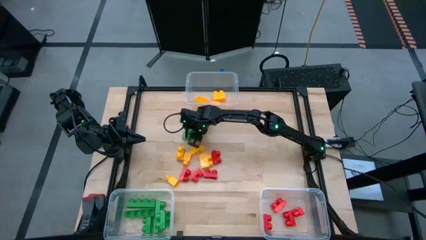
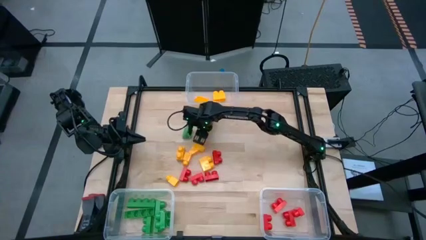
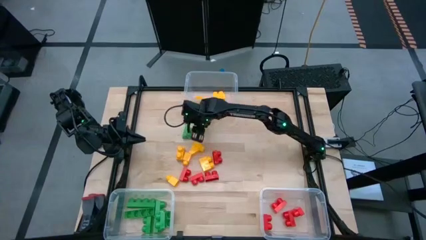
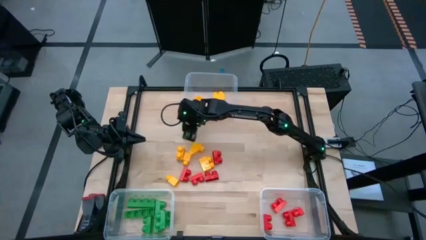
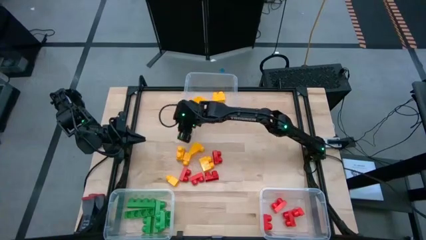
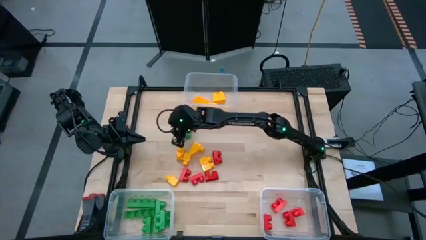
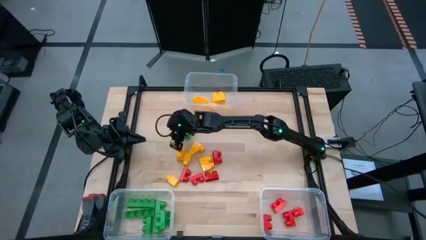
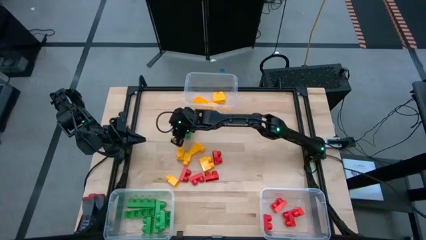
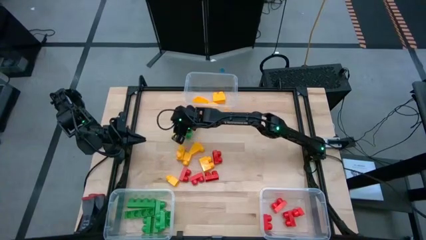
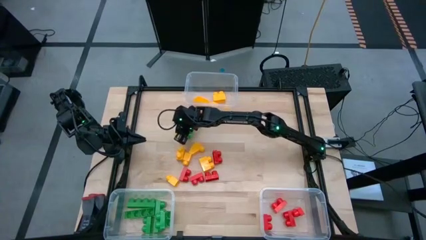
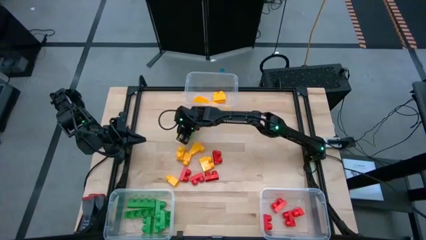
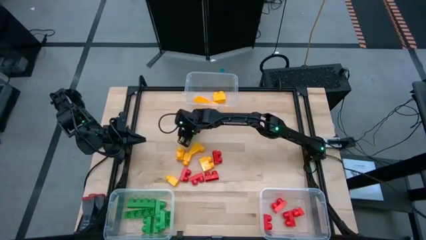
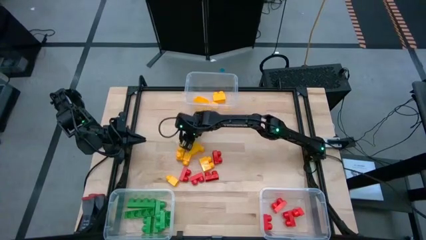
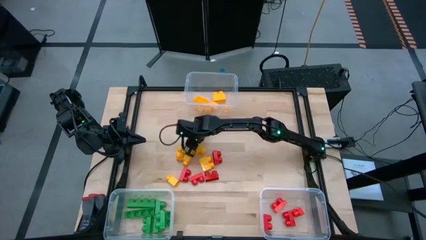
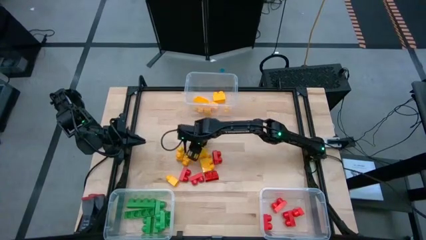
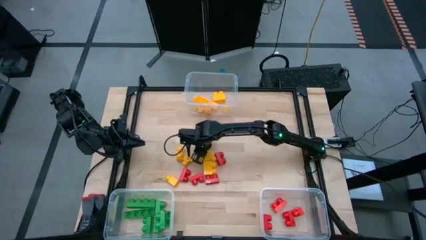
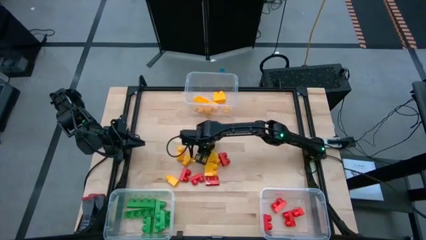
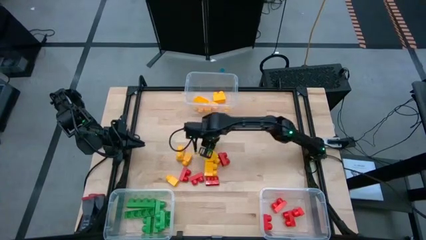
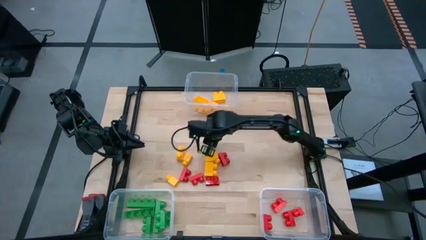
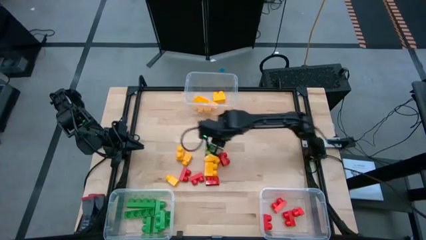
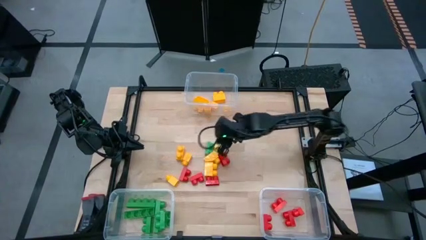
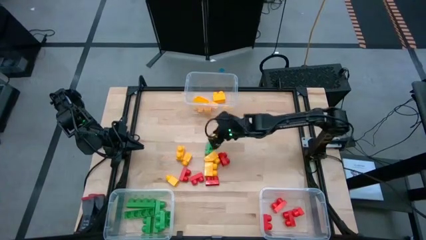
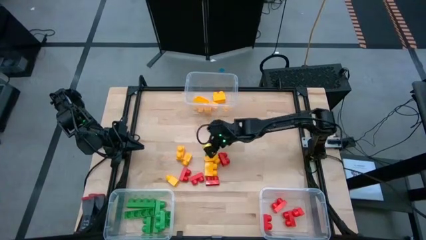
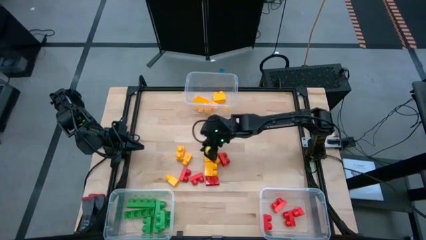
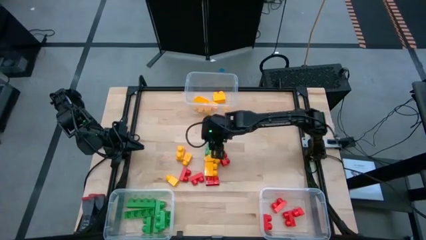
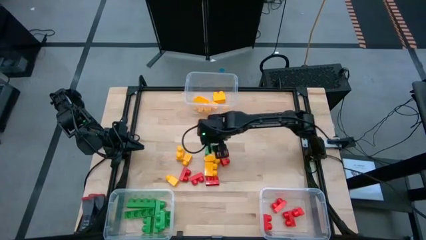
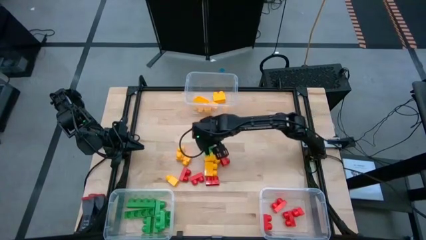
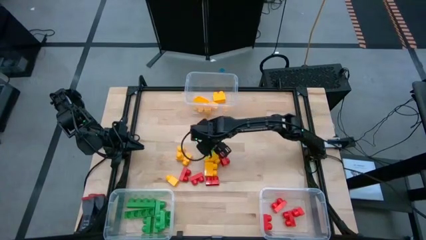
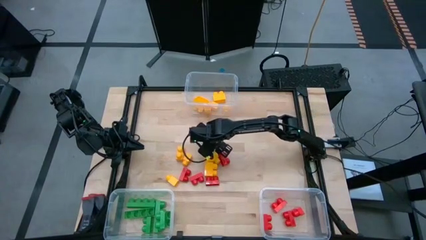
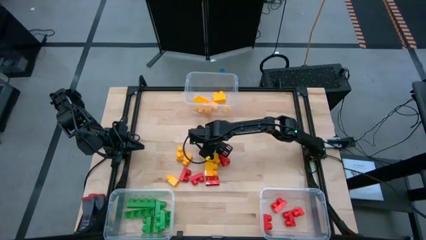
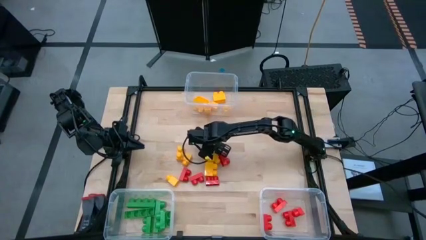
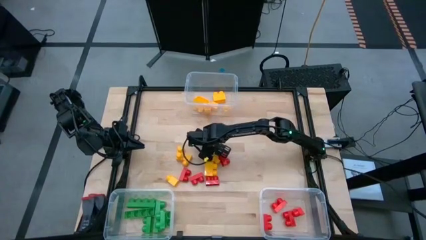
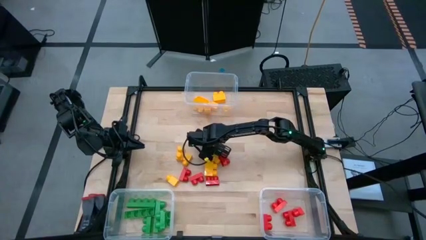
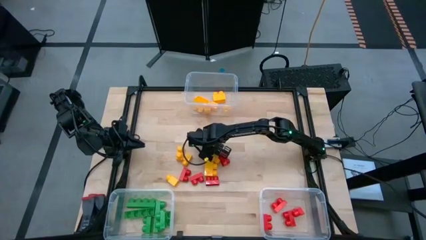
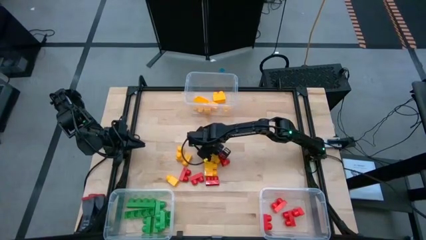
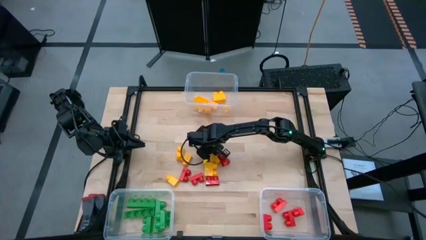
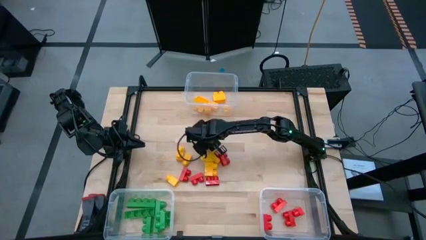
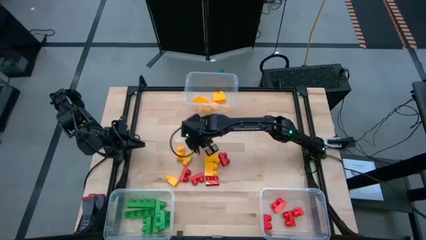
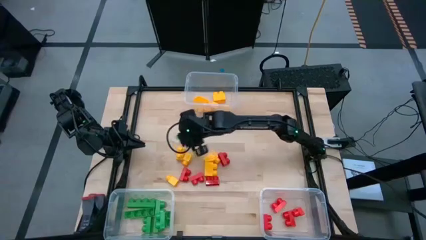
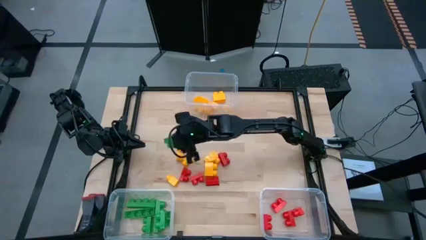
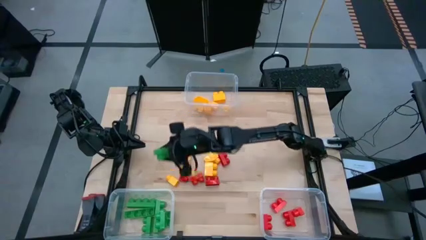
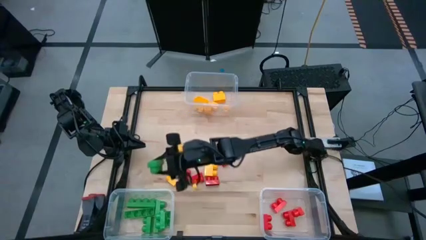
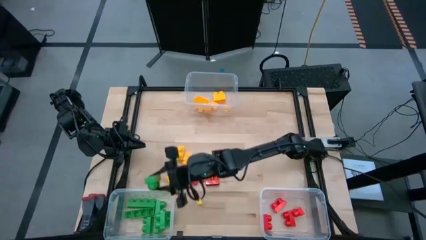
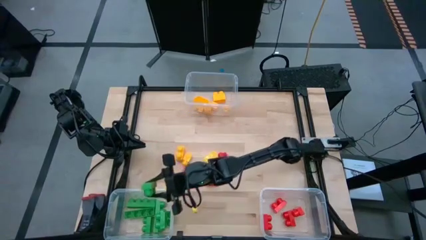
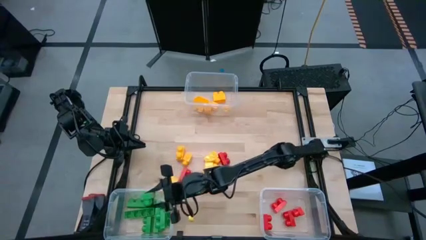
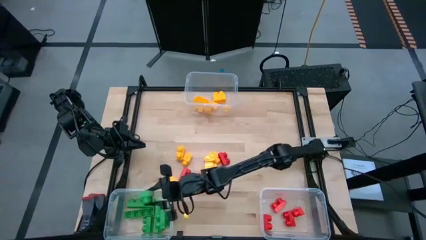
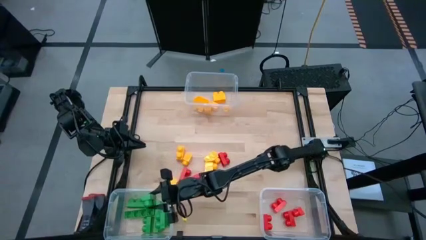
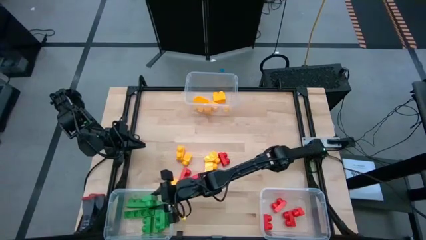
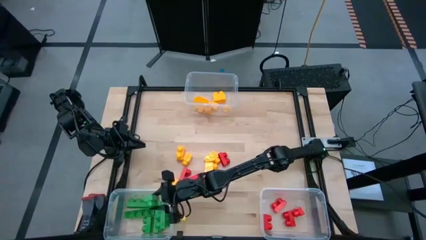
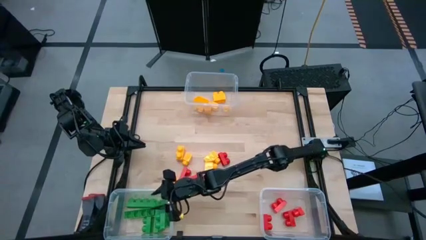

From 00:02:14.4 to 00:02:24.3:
Task: Sort blocks
Put the green game piece into the bottom left transparent bin

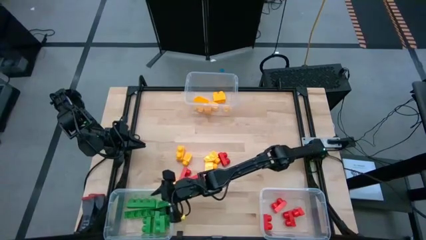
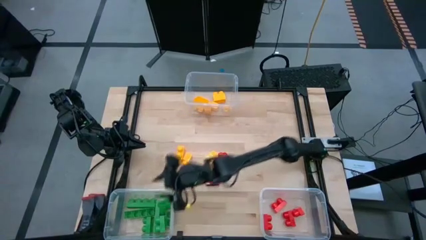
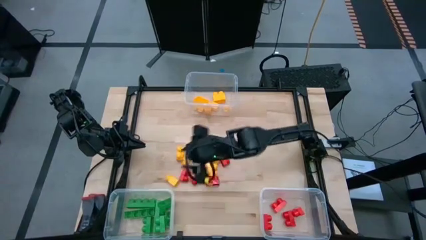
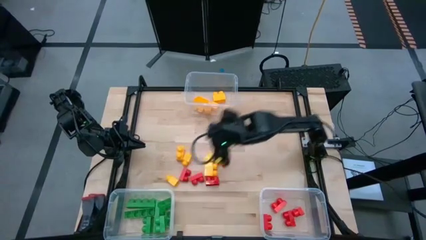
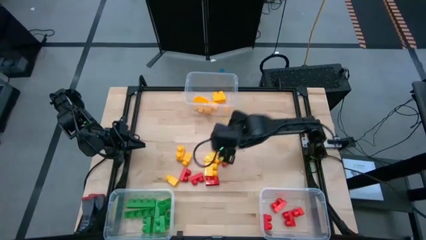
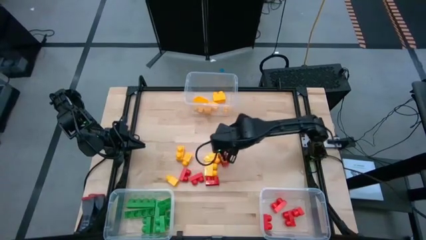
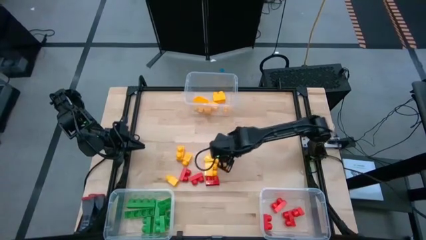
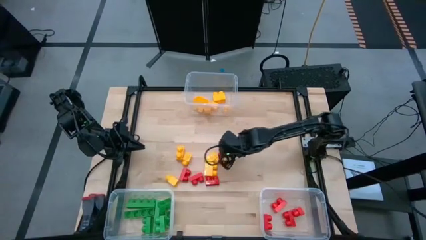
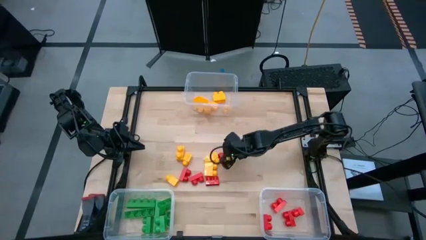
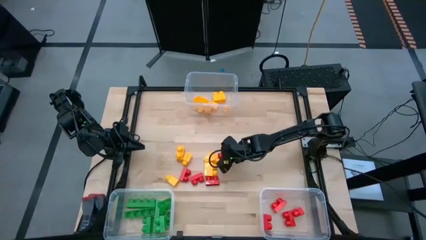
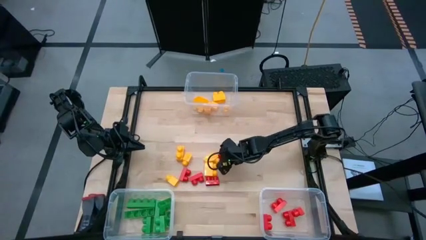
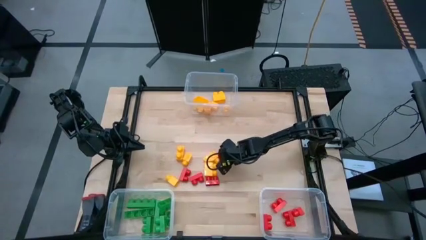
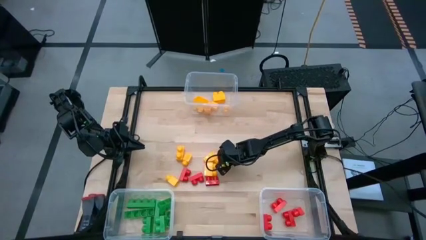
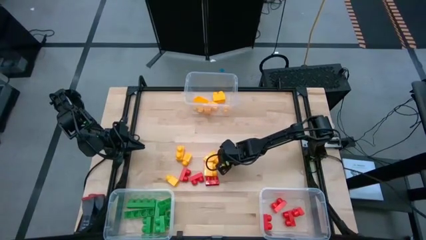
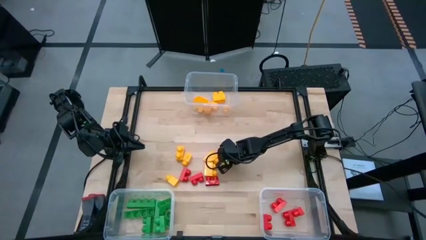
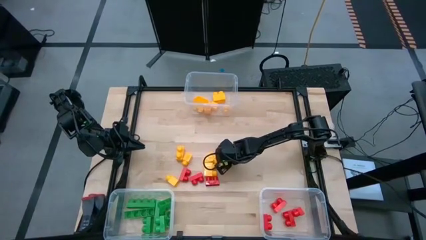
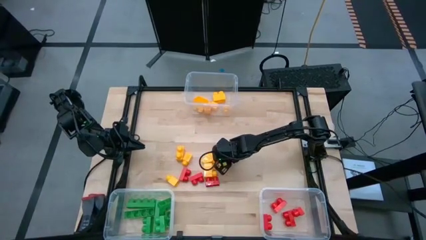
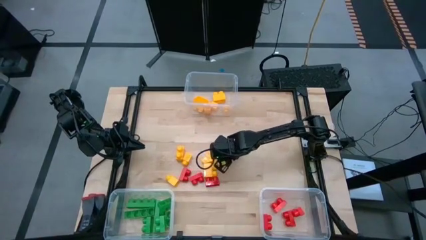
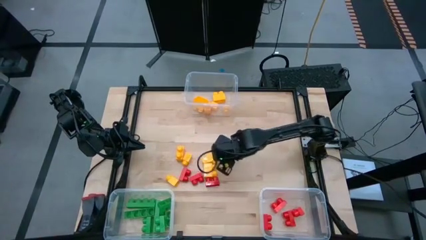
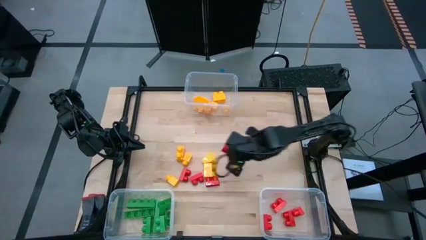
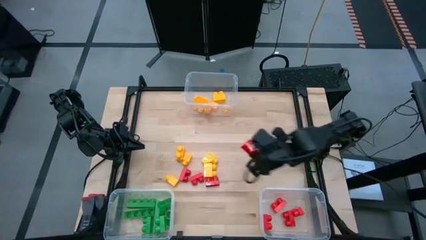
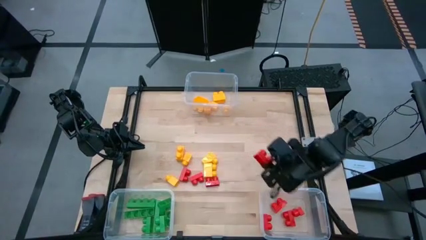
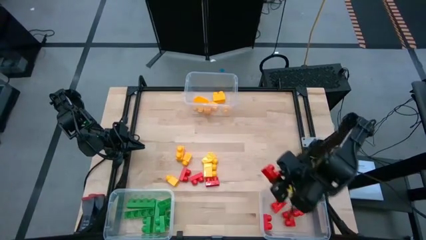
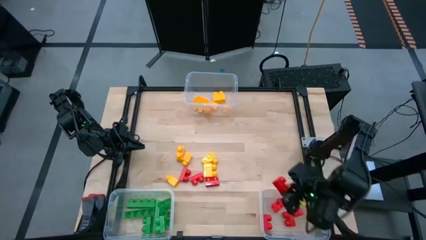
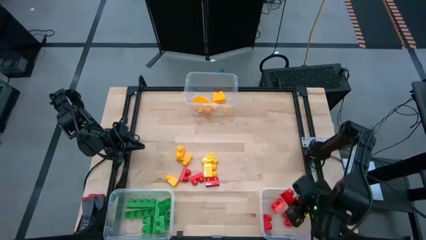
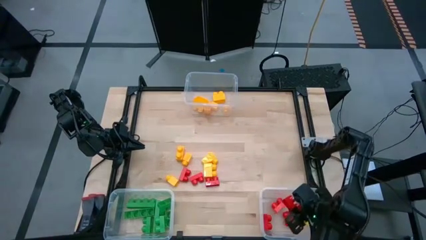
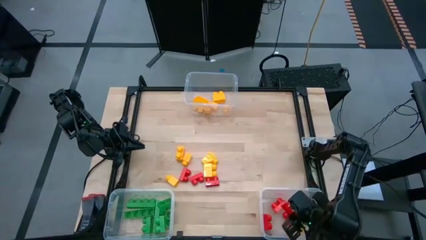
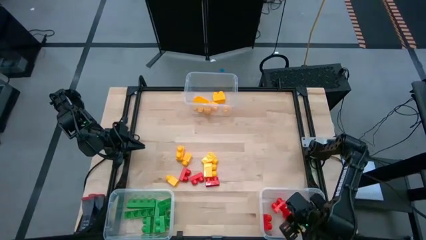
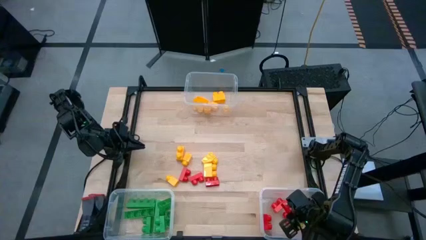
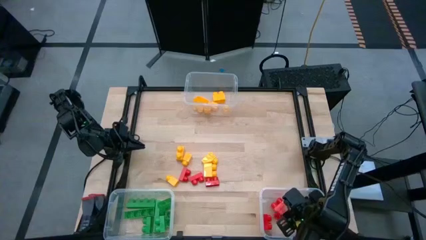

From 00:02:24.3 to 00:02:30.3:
Put the red game piece into the bottom right transparent bin

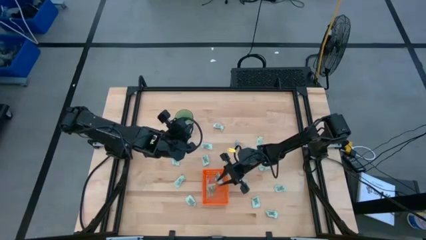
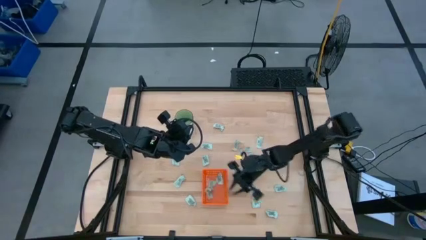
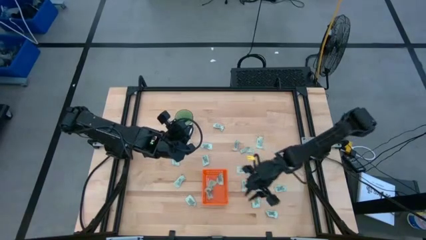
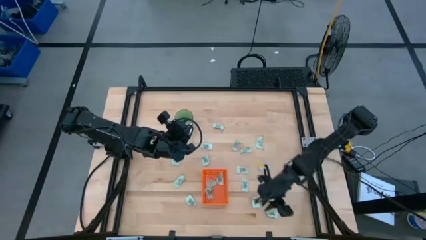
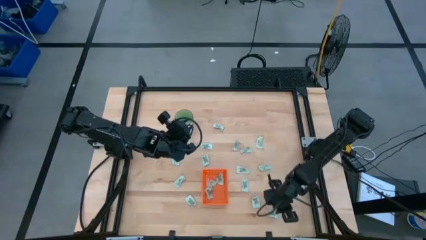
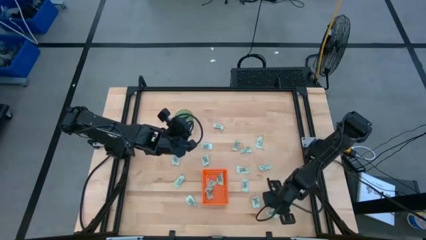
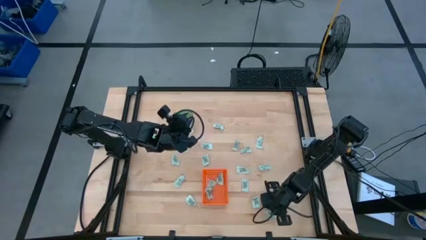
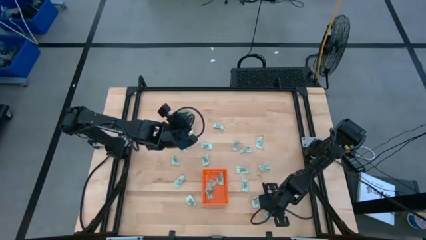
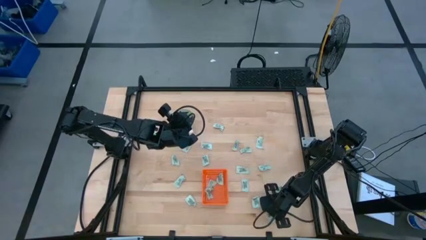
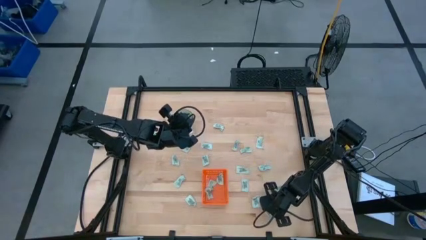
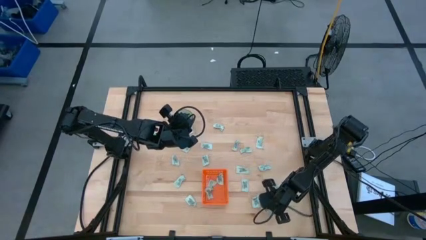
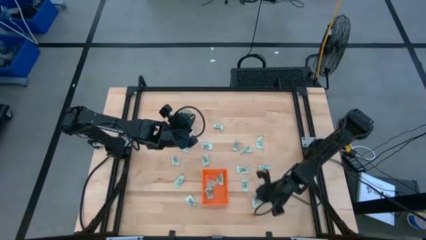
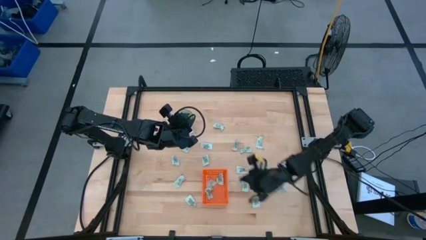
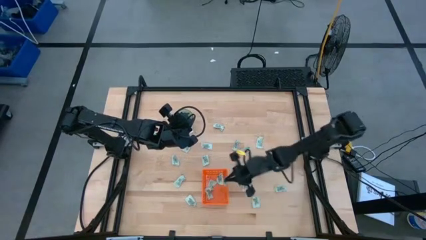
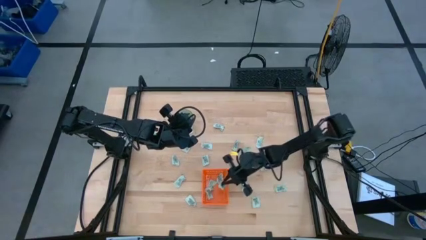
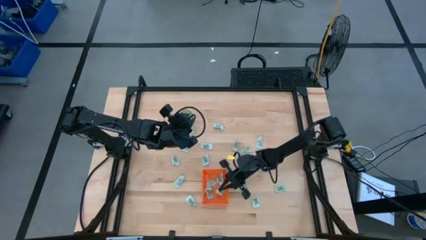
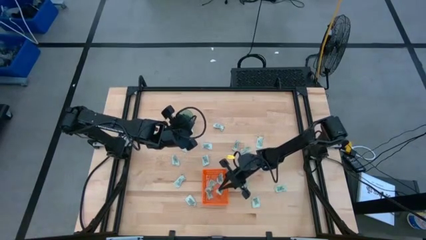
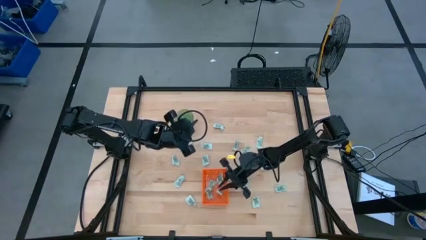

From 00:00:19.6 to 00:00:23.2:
Task: Pick and place Stevia / Truvia into bins
Put the stevia packet into the orange basket
